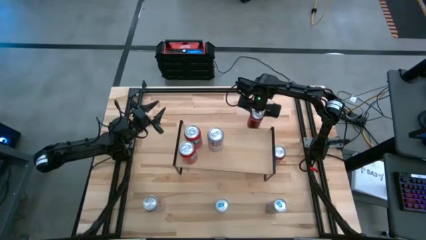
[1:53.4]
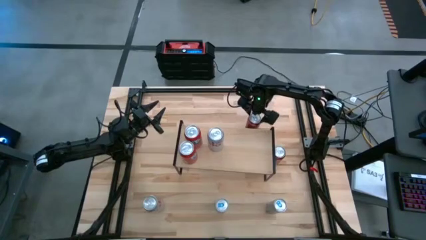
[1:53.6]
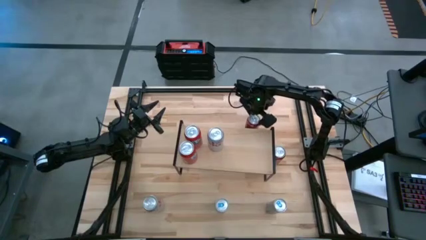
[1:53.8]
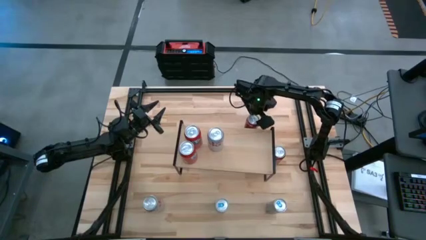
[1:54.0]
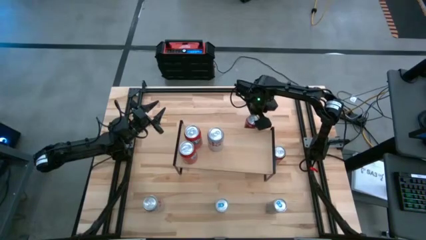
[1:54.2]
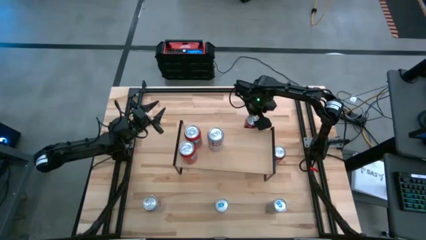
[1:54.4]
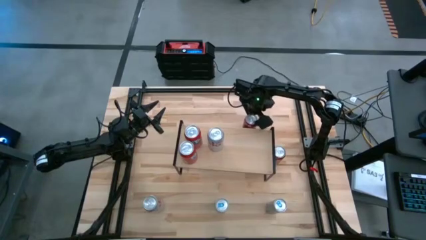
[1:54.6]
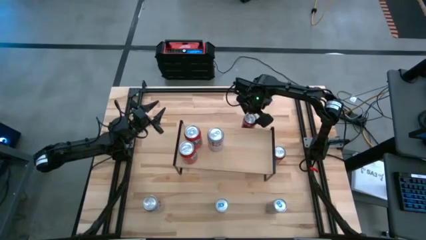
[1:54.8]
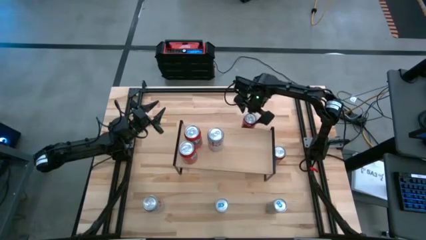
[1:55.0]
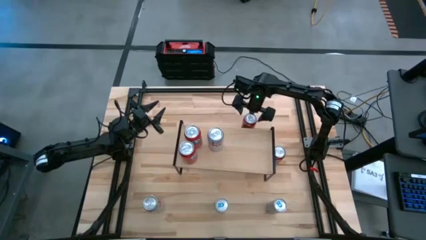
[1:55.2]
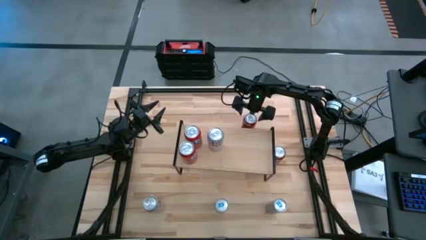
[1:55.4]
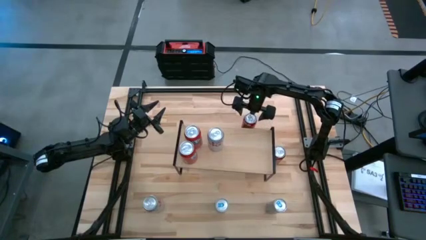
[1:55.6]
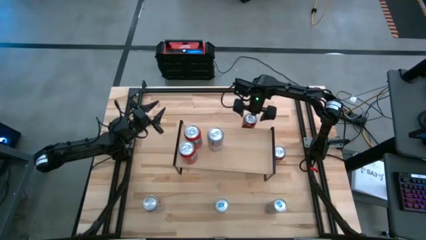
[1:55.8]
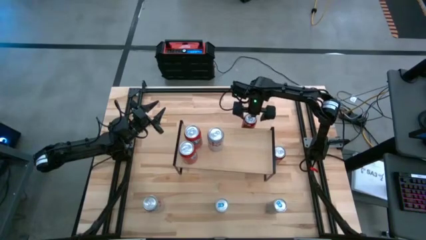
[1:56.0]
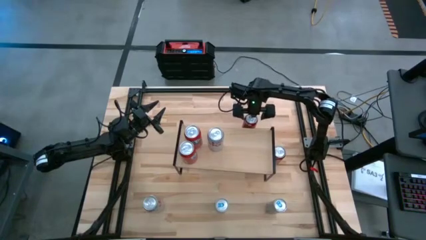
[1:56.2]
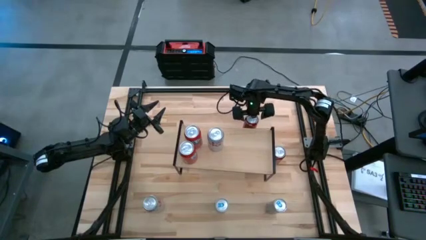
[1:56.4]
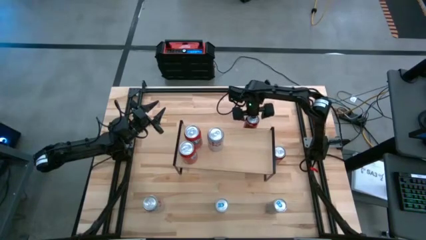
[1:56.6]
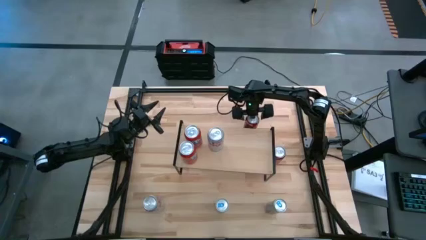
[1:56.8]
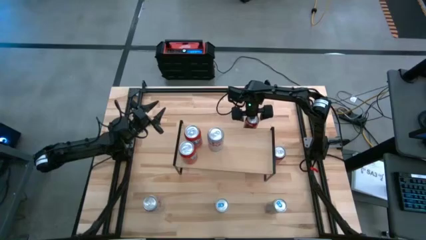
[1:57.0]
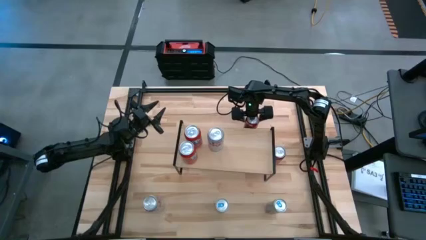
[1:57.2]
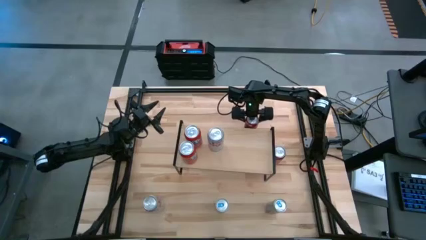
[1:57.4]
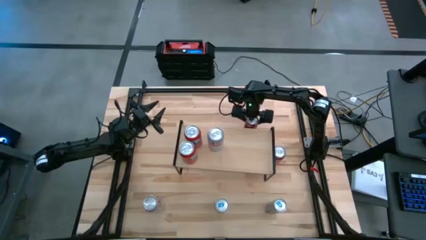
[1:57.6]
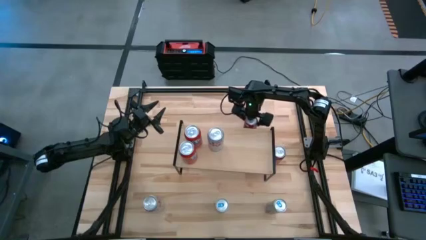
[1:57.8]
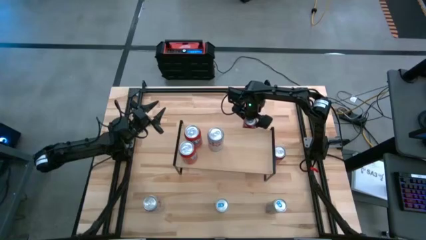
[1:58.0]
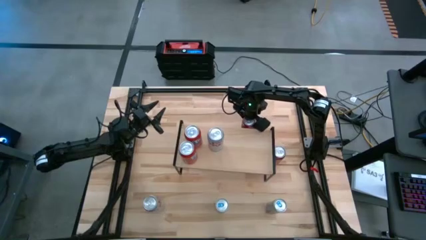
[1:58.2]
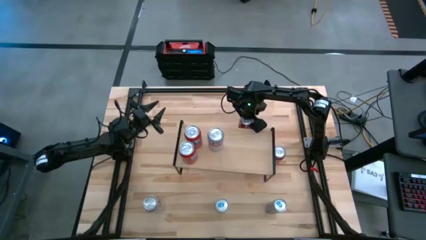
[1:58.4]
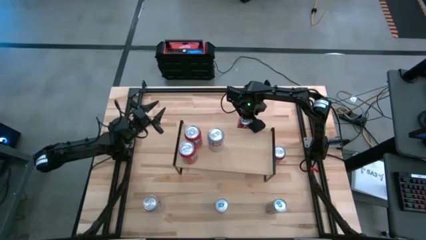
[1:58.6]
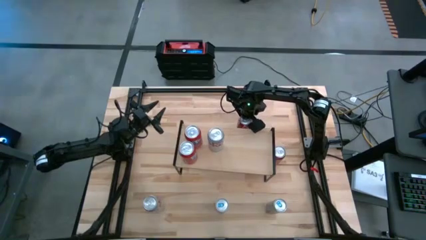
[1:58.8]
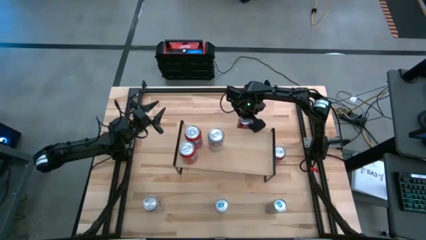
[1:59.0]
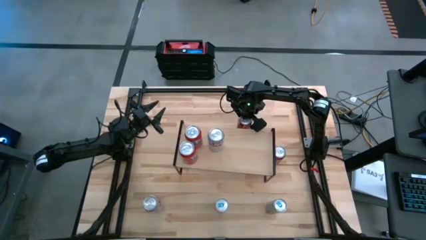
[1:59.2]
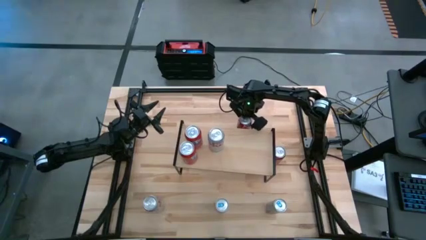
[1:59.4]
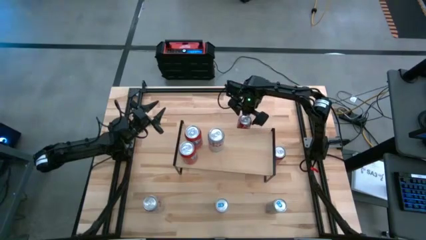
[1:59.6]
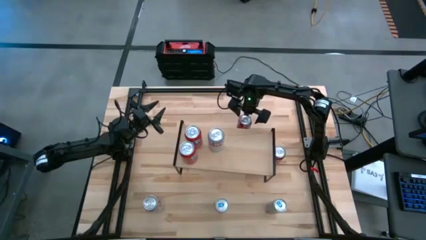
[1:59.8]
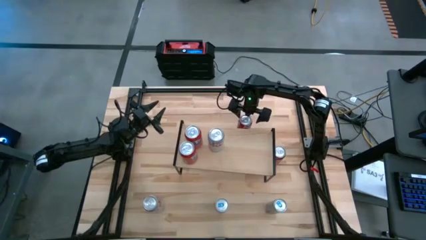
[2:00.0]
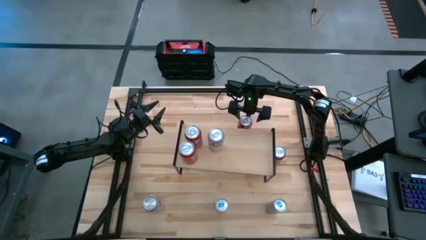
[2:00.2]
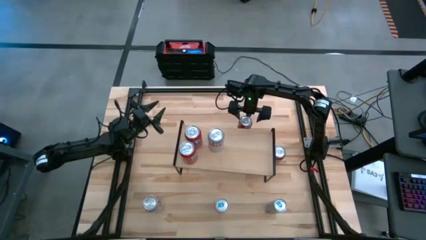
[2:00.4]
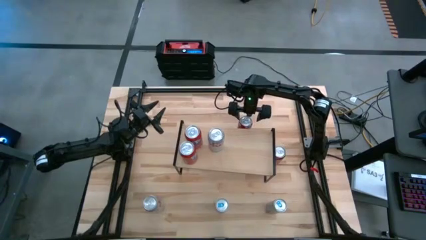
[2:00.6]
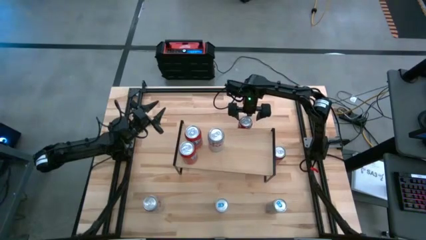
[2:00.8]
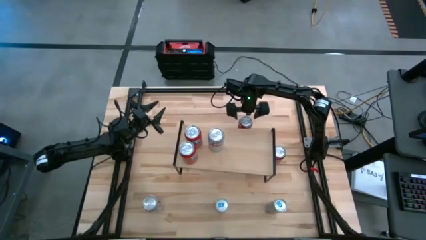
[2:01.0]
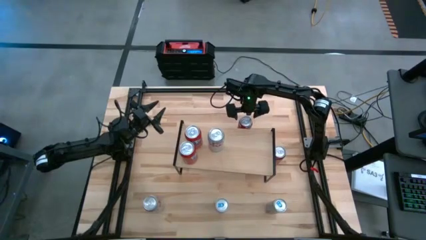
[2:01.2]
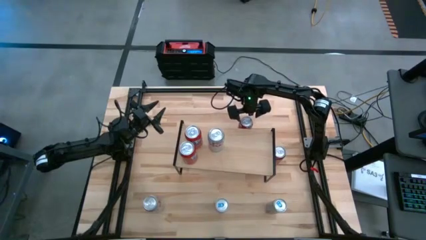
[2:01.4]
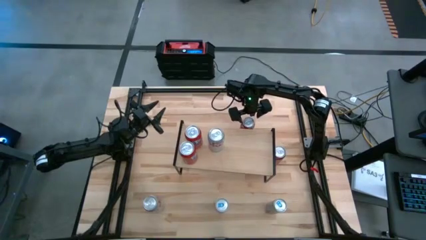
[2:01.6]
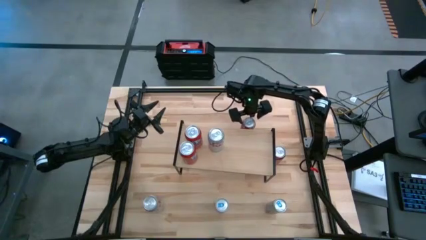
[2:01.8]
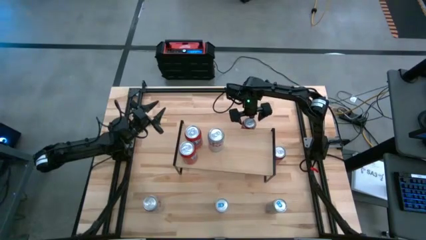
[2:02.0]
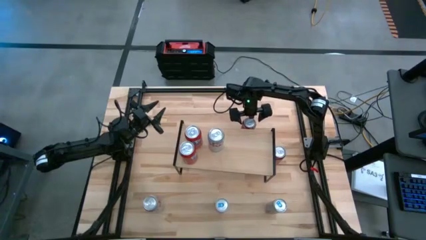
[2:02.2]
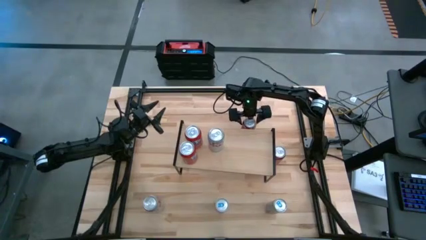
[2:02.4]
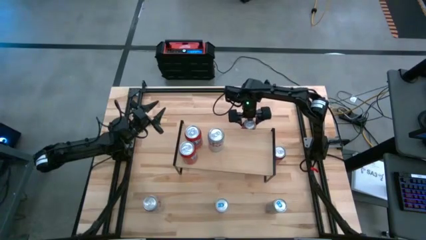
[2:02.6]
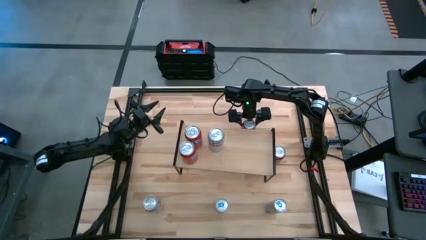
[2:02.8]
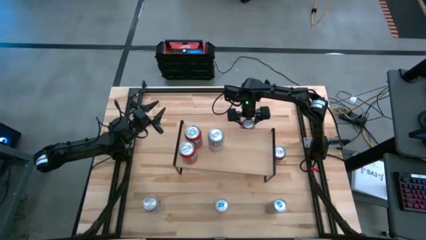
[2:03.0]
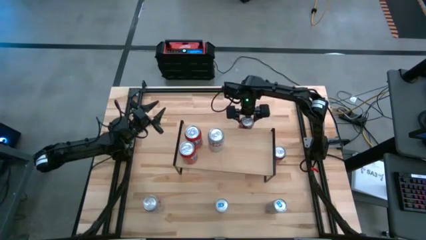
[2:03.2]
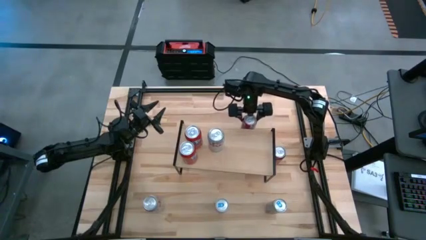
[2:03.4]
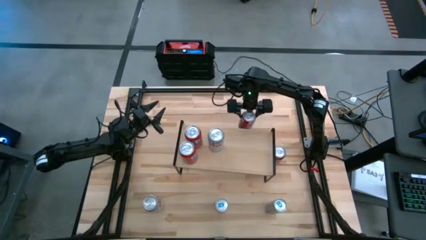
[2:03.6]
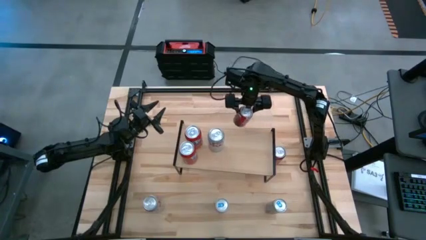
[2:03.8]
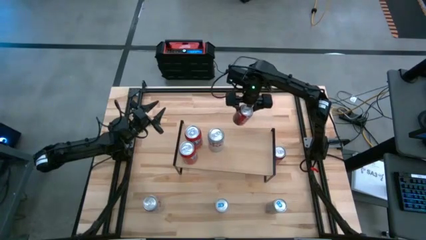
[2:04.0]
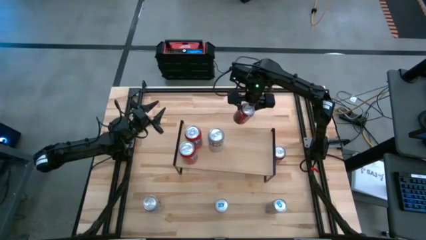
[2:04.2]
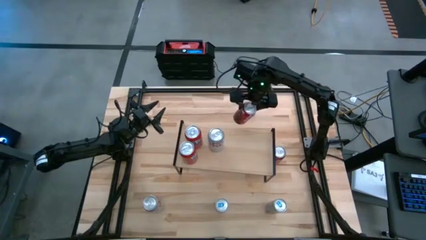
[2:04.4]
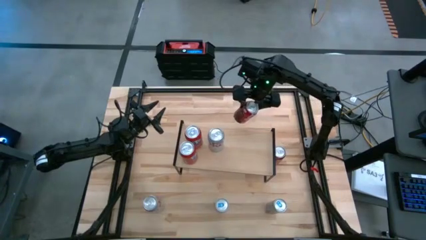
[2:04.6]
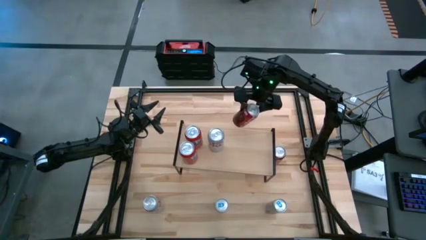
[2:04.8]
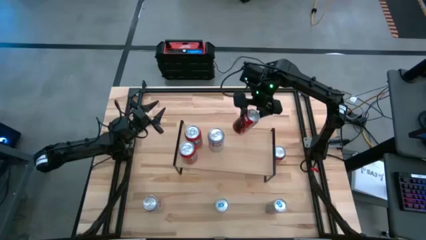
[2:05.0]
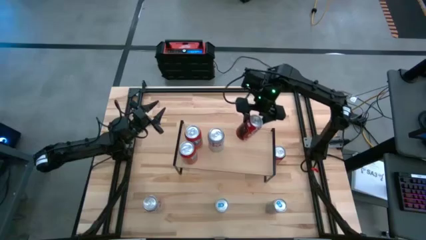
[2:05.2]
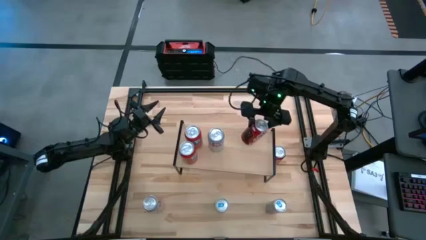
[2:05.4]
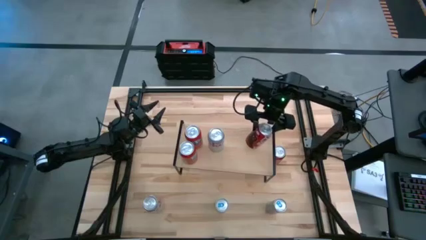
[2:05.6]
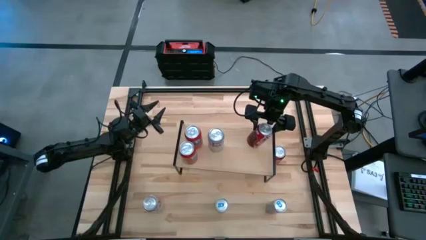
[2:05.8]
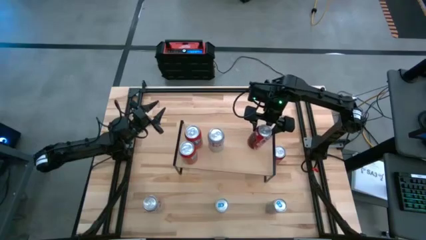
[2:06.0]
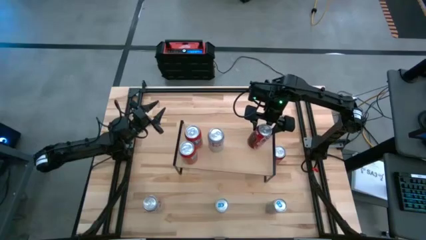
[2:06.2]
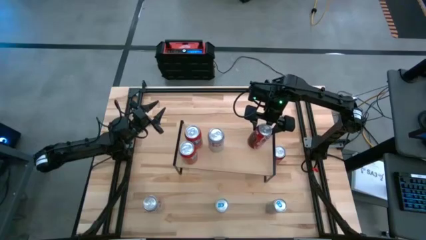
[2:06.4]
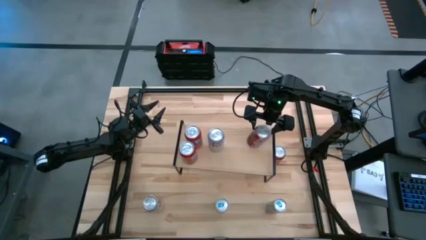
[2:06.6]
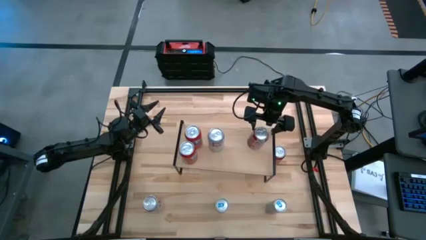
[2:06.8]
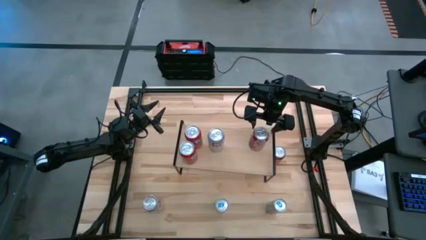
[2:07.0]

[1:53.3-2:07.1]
Task: Place canned beverage on shelf
Put the top red soda can on the shelf

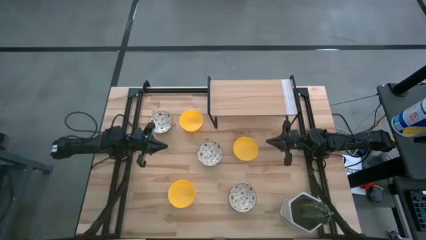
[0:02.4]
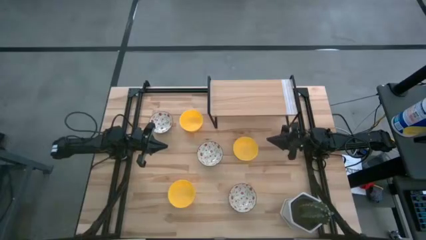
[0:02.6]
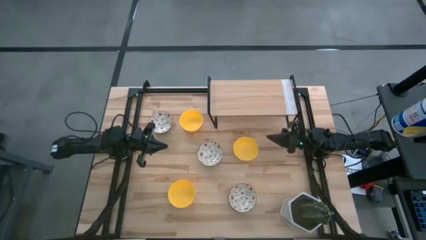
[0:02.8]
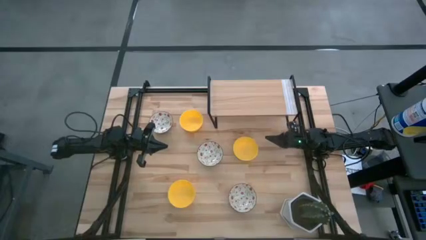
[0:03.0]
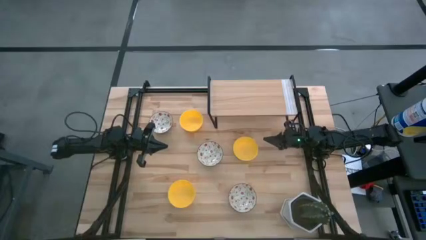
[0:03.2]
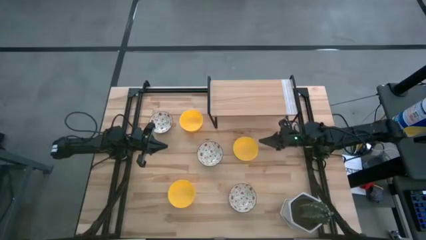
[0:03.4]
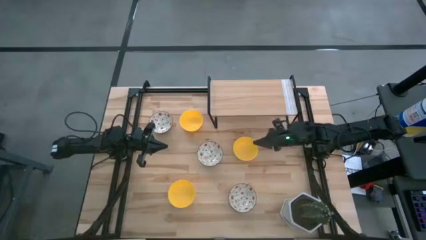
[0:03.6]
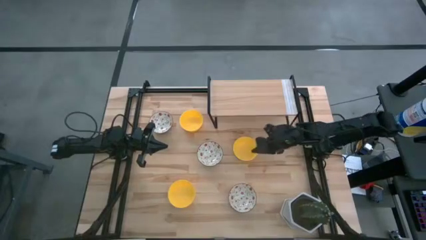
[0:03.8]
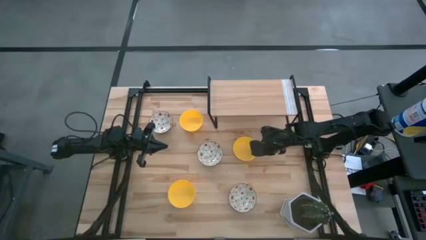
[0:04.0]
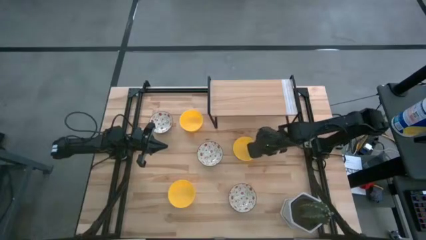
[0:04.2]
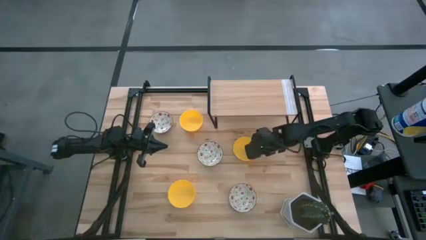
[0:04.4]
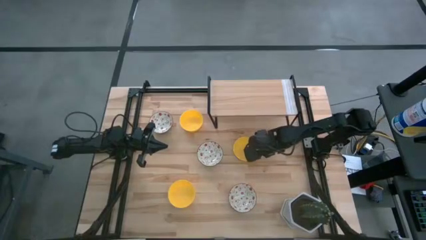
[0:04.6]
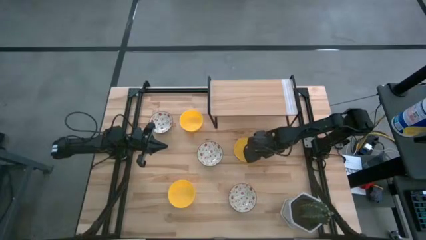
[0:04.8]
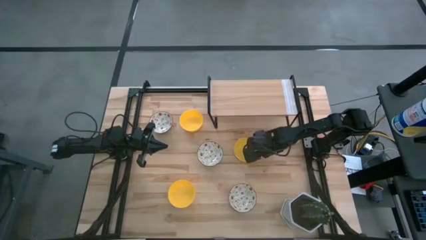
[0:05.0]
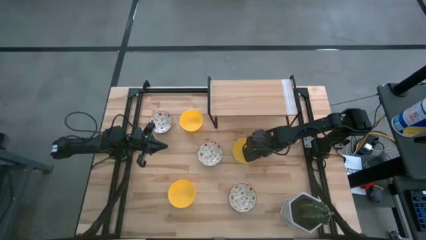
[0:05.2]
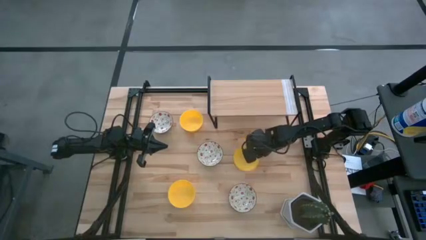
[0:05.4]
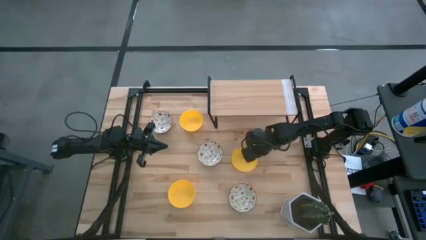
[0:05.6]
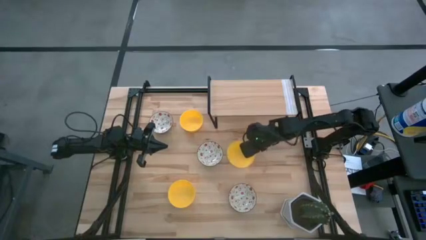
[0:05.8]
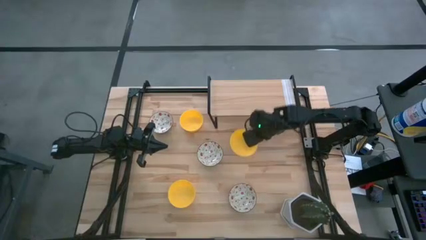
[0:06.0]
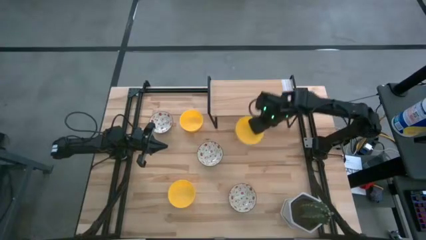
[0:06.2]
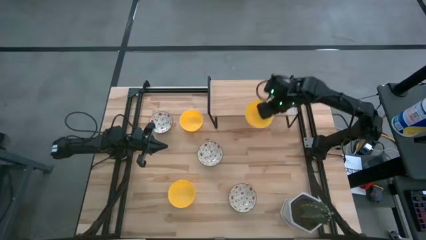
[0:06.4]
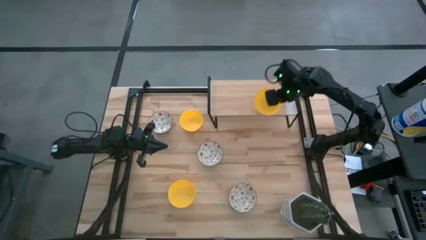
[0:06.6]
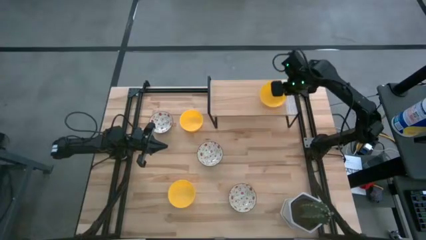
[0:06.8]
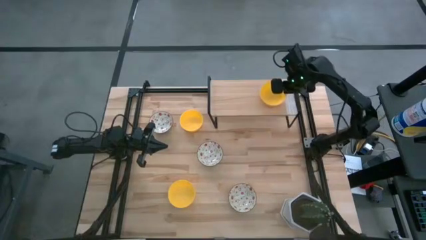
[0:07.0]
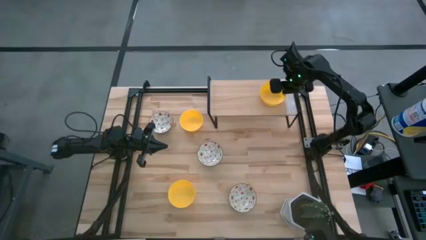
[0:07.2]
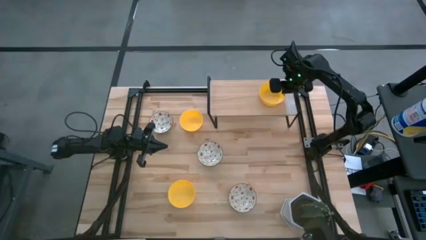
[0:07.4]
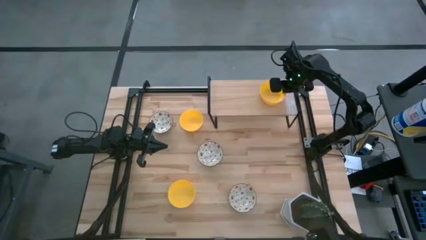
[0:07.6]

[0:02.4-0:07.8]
Task: Pick & Place Mini bowls
Put the middle right yellow bowl on the shelf
